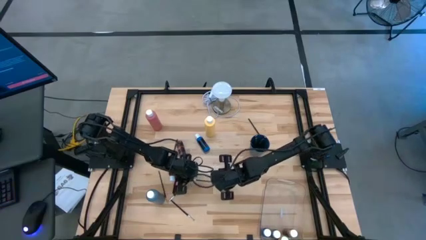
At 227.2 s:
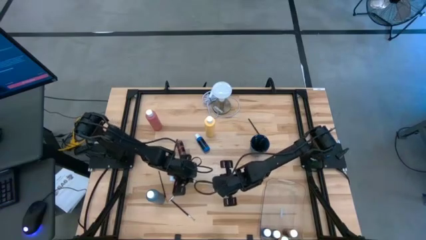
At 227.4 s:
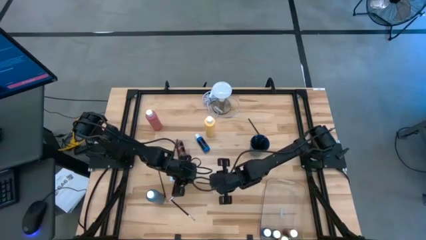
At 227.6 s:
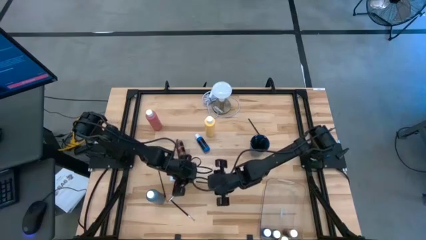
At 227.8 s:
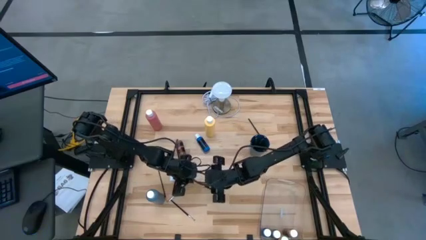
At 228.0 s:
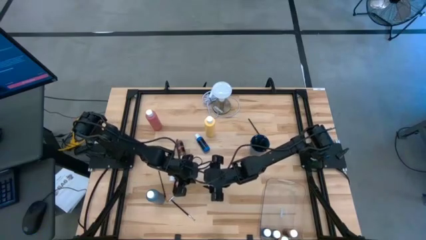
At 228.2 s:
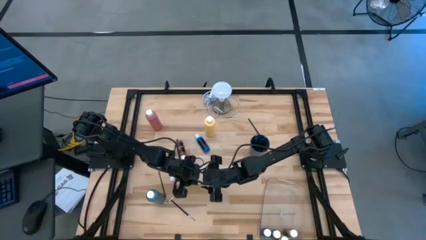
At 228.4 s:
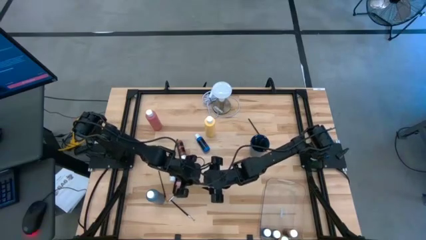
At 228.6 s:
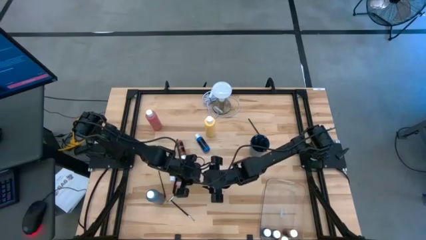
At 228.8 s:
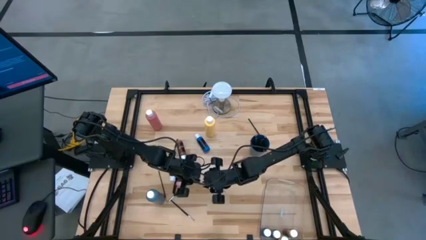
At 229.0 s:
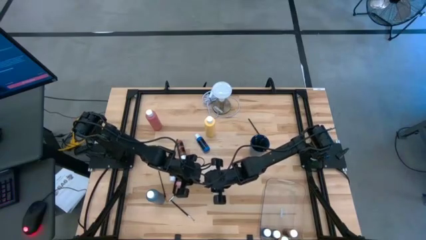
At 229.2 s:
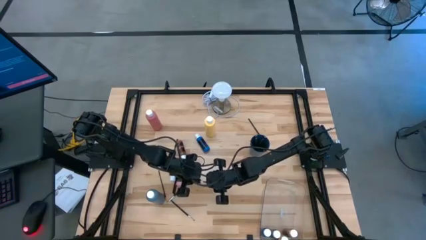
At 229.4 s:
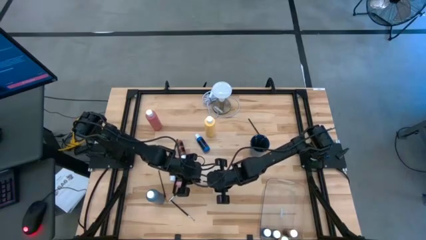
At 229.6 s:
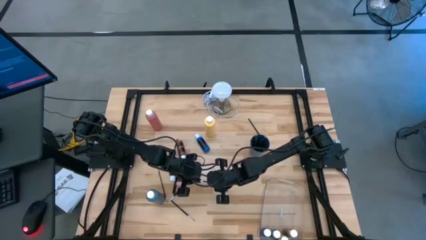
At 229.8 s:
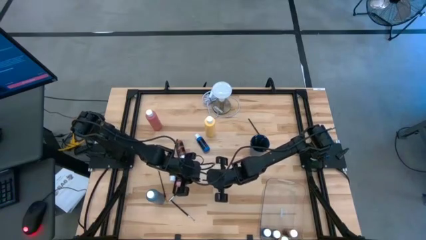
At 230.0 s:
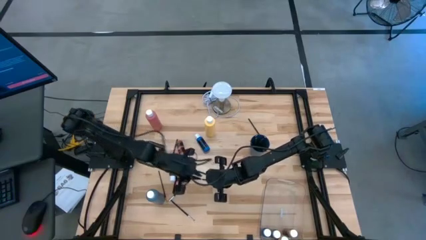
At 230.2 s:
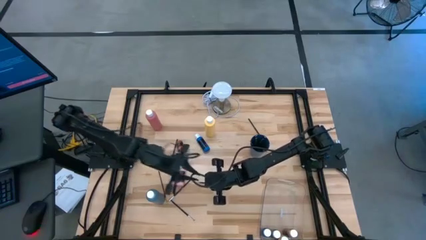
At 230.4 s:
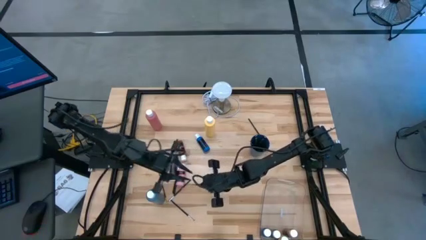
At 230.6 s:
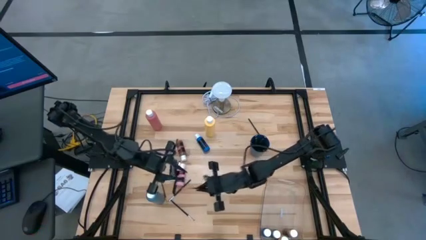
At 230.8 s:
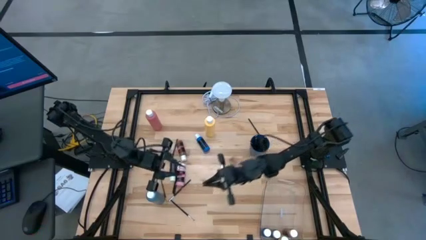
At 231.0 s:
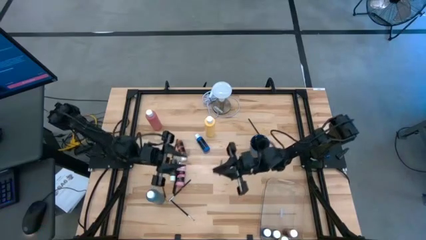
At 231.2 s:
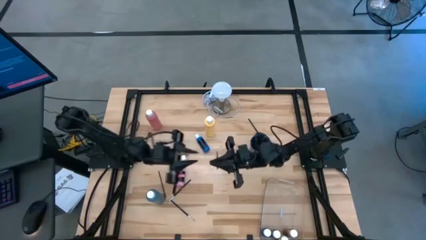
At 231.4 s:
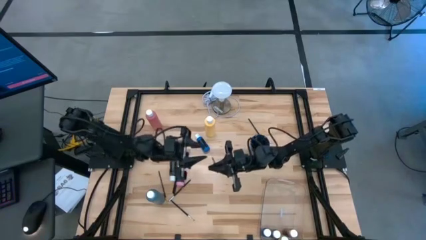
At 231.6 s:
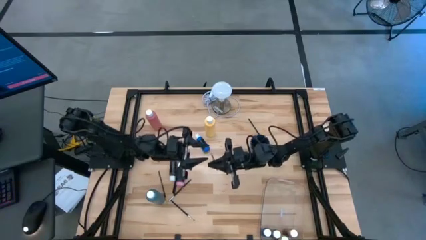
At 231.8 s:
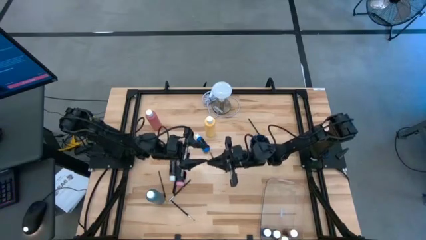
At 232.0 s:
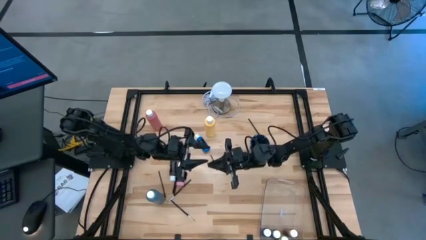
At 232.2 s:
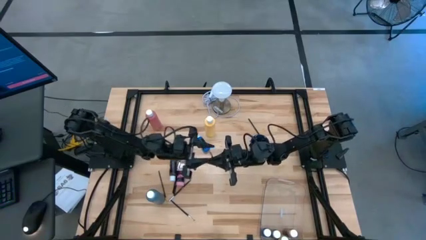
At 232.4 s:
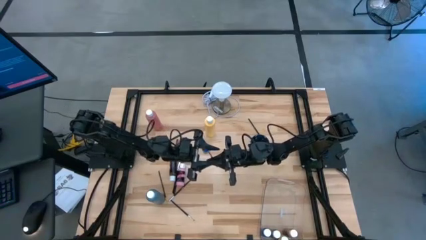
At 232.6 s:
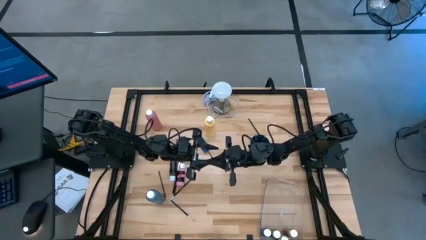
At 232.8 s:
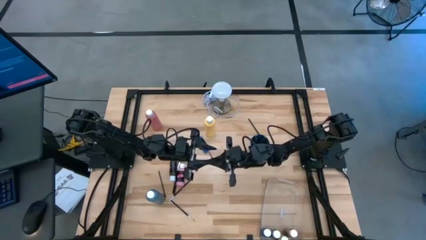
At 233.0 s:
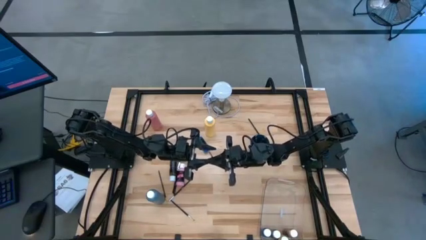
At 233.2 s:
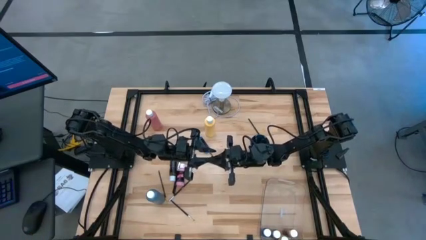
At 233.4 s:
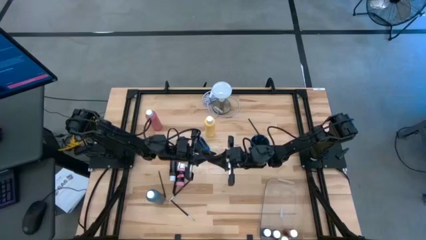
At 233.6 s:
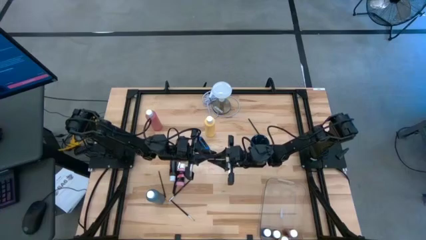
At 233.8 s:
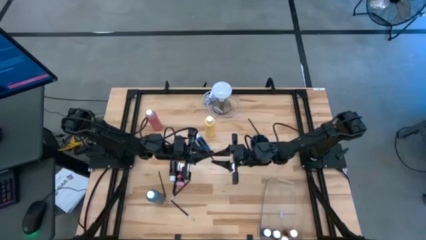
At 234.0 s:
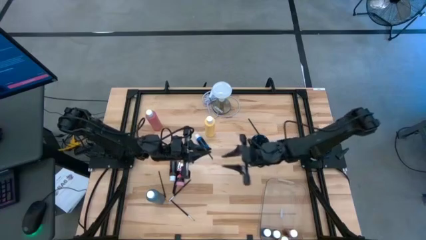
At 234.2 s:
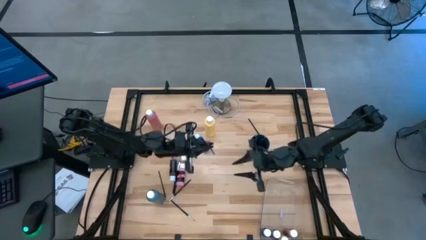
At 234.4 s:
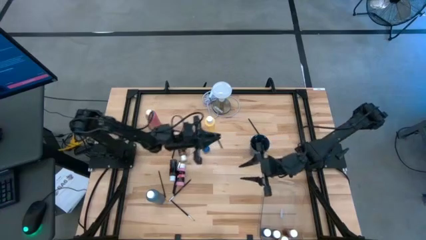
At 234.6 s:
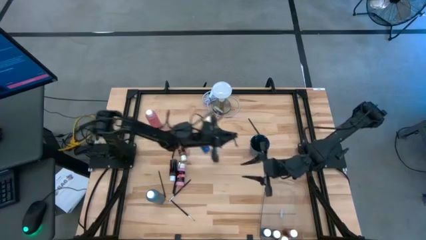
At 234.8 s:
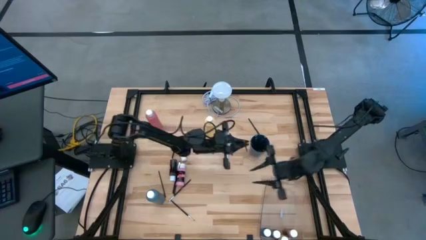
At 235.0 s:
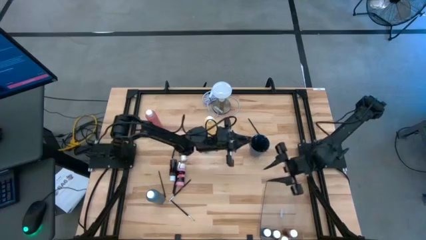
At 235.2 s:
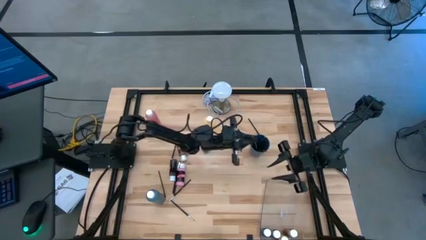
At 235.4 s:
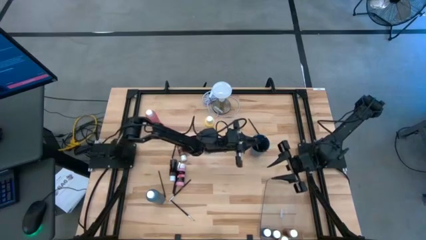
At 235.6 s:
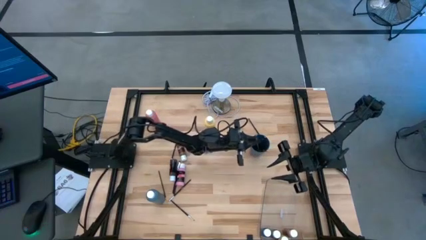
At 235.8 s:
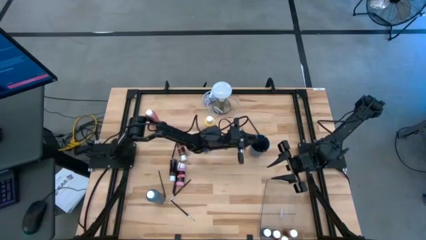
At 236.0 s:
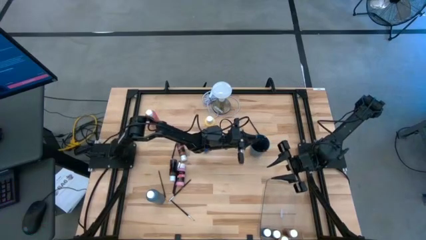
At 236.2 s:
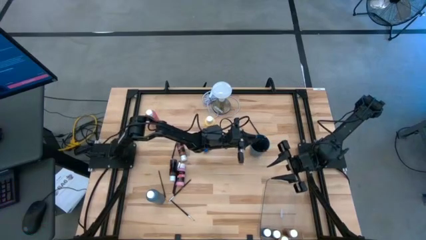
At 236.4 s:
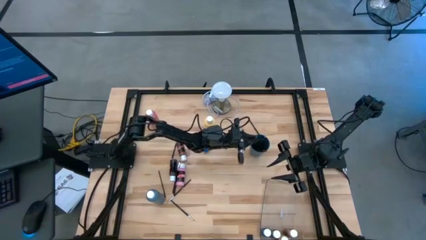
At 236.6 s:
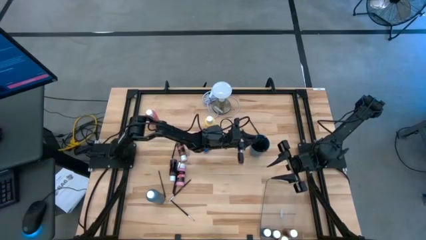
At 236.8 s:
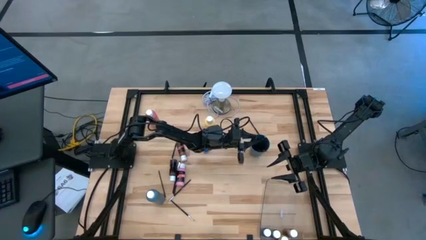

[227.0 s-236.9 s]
Task: Pick & Place Paint Supplies
Put the black silver paintbrush into the blue cup

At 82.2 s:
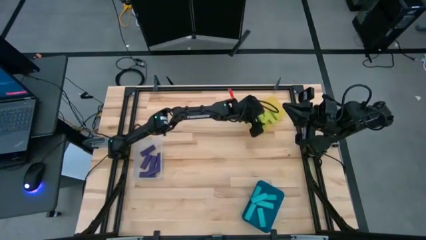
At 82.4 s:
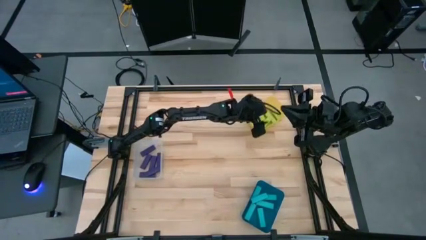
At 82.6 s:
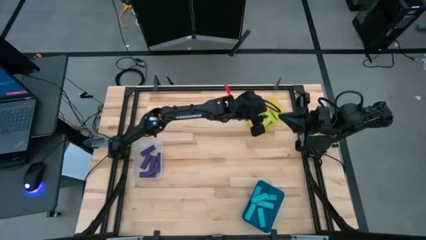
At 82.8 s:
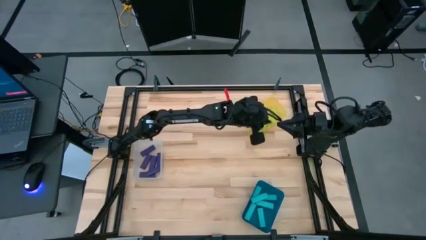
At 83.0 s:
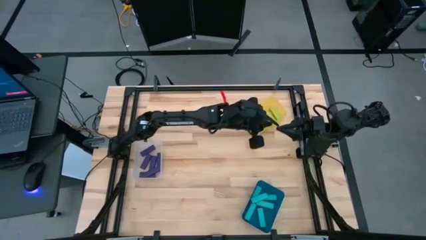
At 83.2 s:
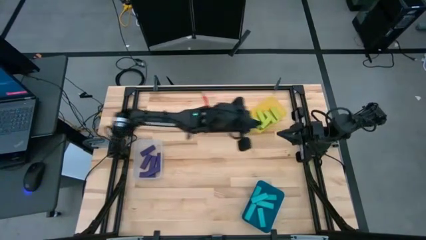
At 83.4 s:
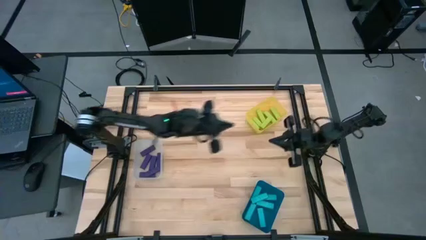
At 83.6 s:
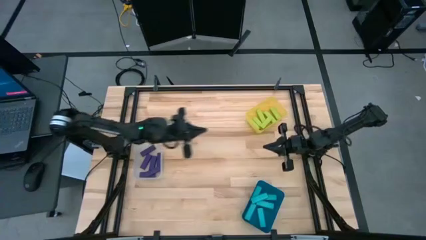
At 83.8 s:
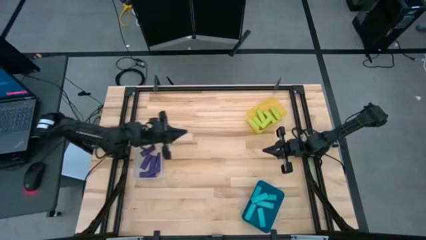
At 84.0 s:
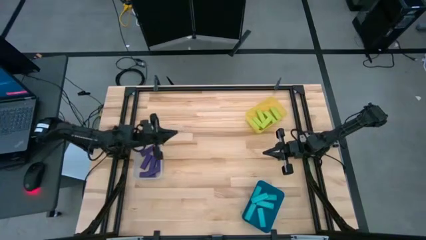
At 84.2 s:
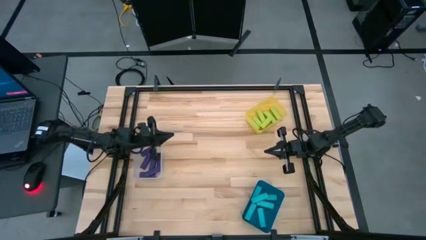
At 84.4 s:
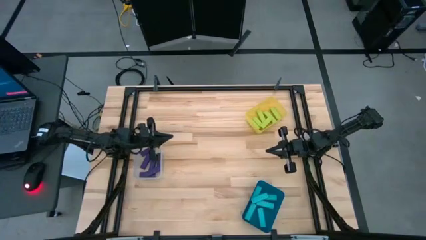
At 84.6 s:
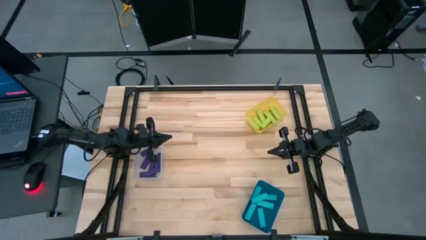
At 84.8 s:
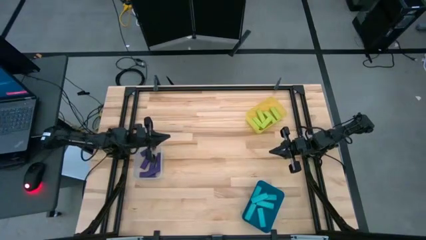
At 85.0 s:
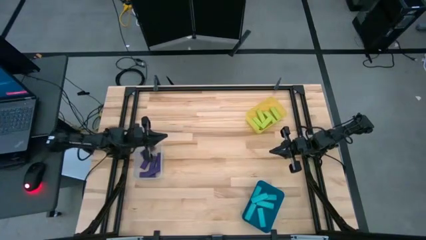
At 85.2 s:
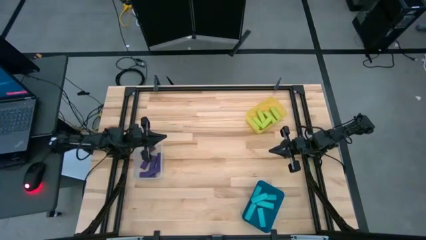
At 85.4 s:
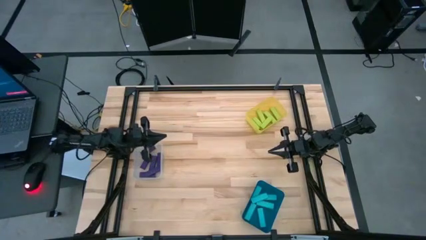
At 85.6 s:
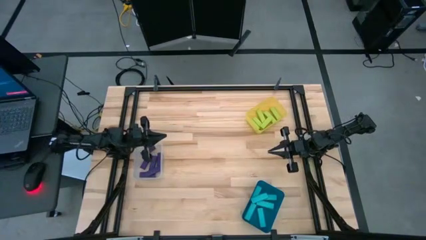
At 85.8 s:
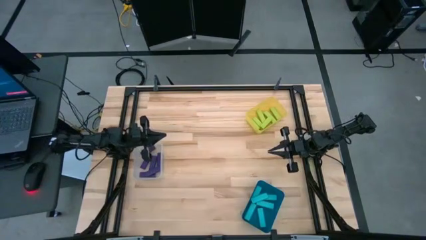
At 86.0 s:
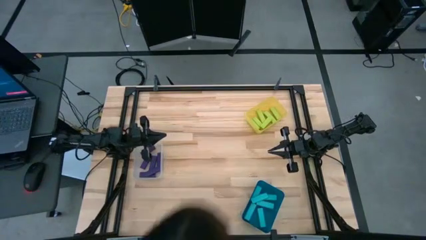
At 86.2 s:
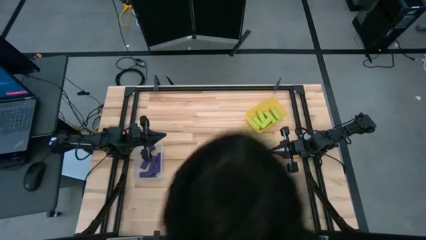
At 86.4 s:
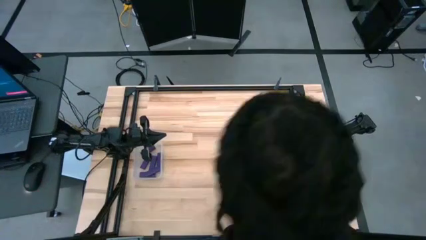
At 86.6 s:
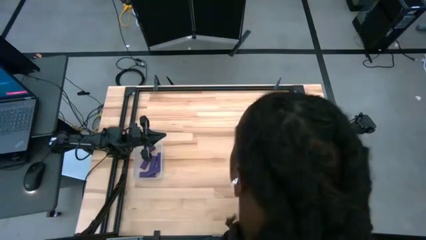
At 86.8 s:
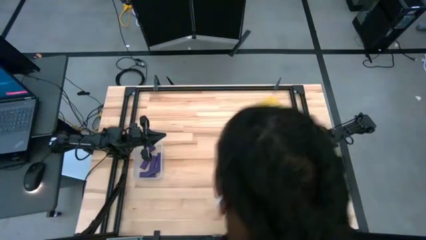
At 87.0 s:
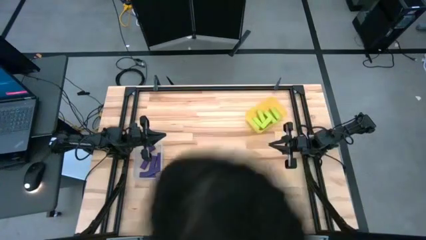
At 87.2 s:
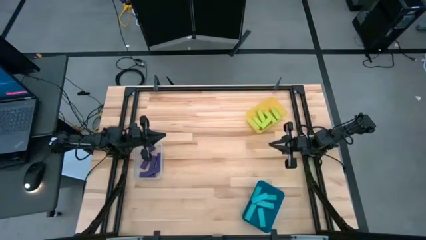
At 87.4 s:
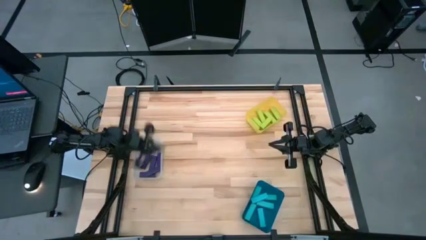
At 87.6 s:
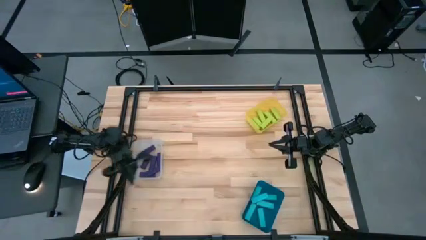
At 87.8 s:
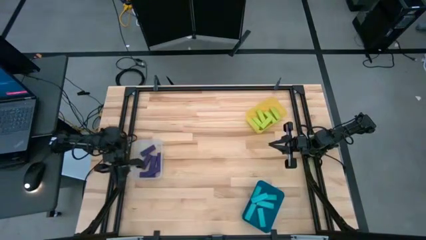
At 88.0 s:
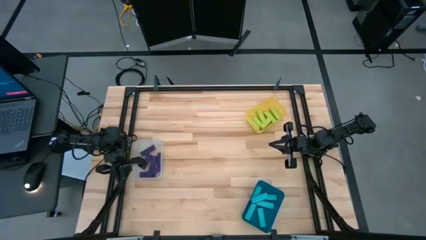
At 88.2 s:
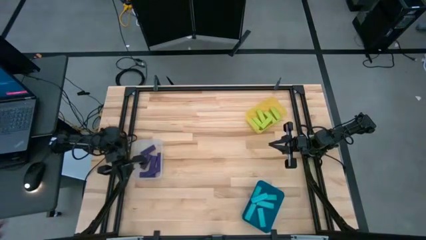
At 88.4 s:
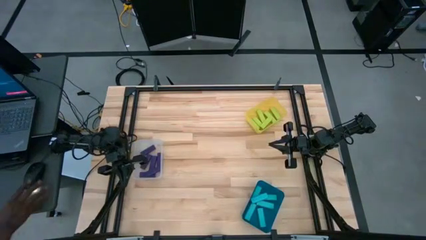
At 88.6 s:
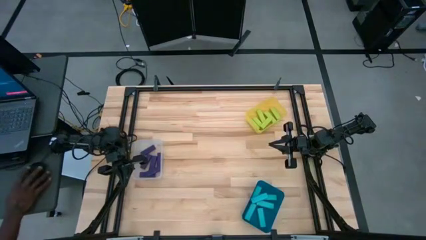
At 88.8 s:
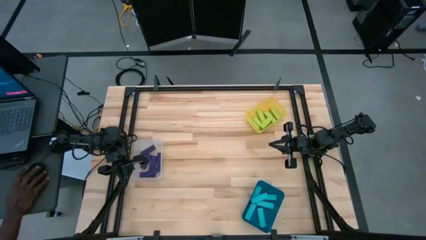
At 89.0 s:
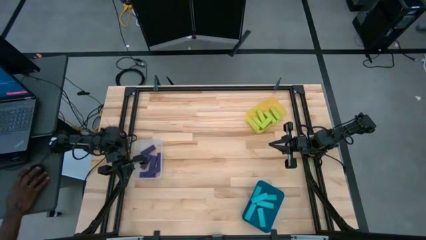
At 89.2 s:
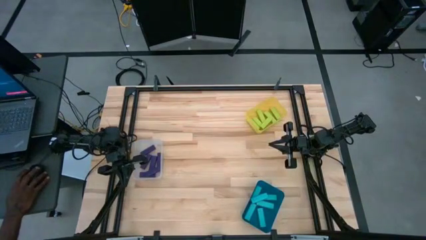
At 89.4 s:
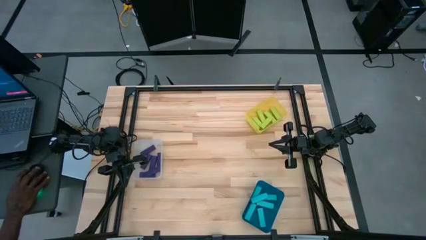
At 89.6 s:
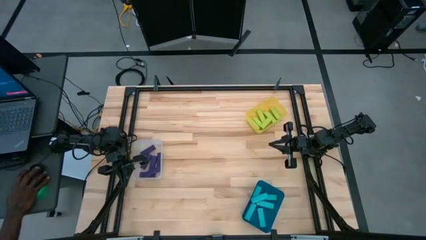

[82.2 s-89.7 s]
Task: Sort blocks
Return to Home Position
